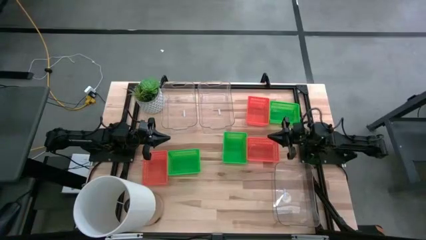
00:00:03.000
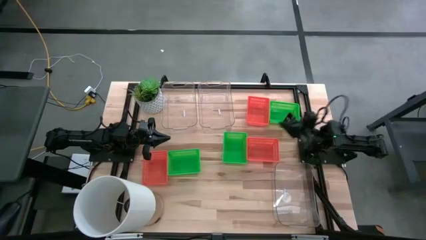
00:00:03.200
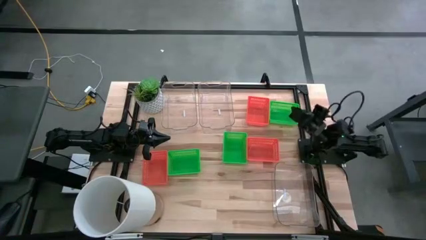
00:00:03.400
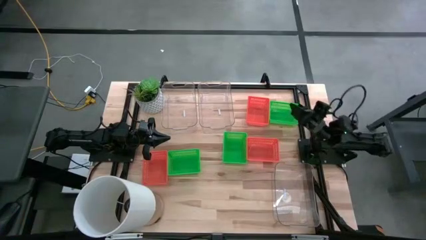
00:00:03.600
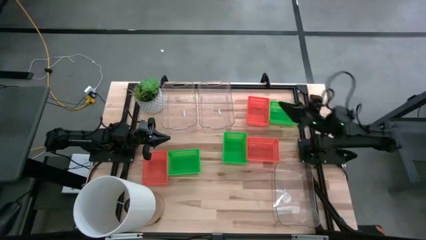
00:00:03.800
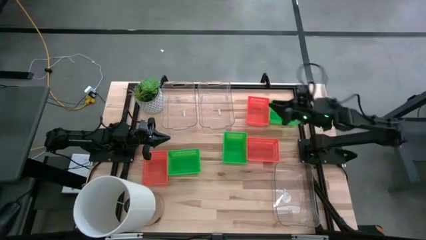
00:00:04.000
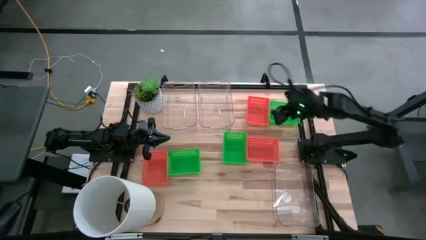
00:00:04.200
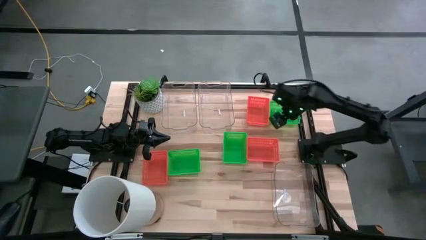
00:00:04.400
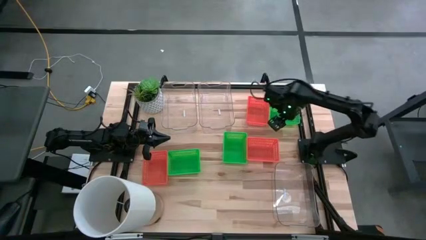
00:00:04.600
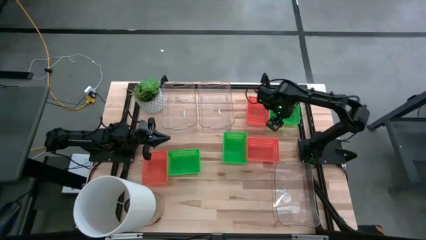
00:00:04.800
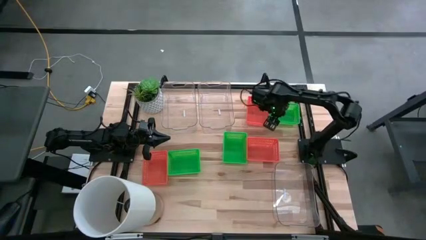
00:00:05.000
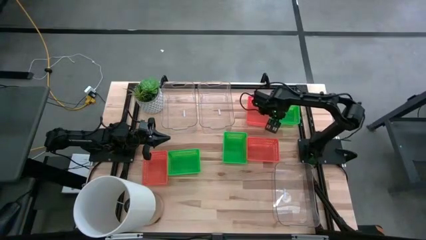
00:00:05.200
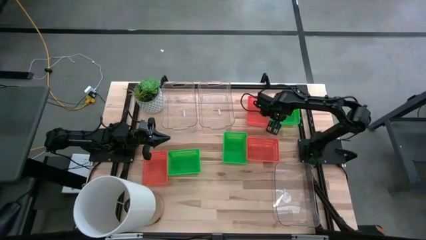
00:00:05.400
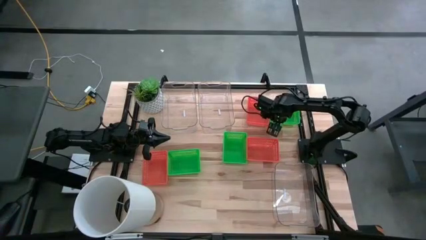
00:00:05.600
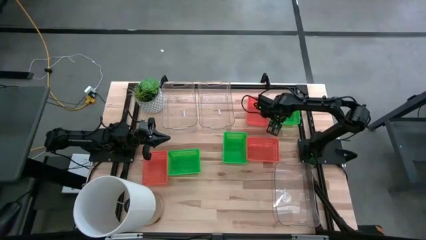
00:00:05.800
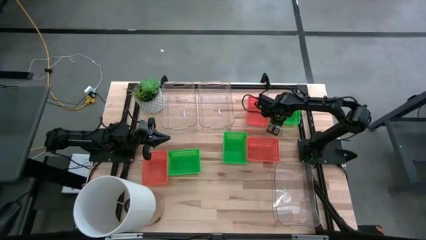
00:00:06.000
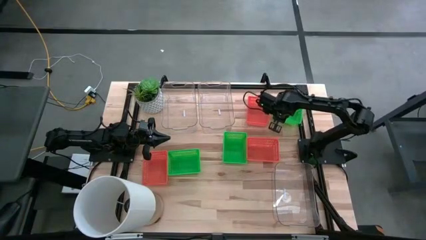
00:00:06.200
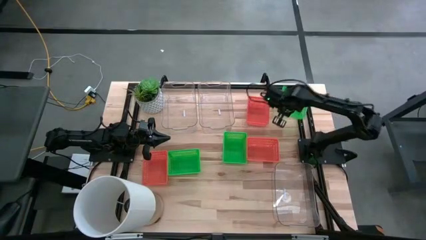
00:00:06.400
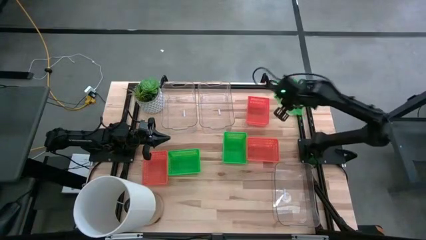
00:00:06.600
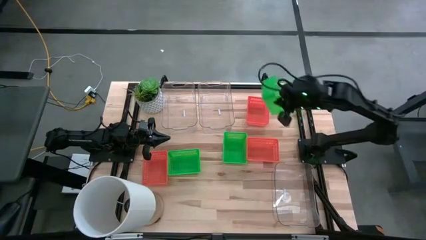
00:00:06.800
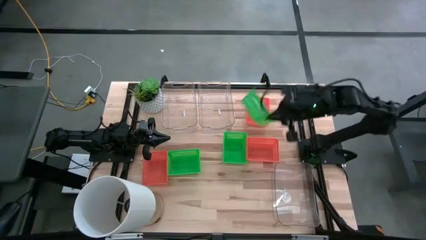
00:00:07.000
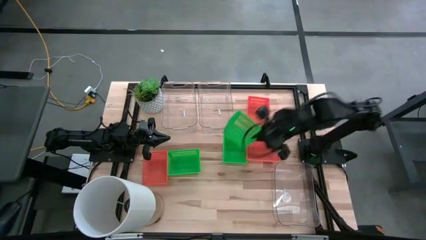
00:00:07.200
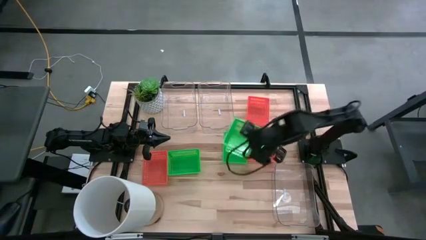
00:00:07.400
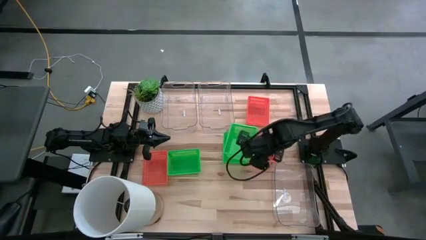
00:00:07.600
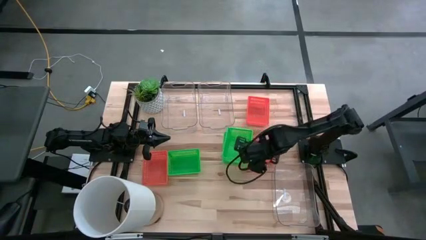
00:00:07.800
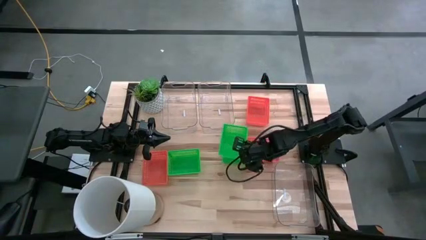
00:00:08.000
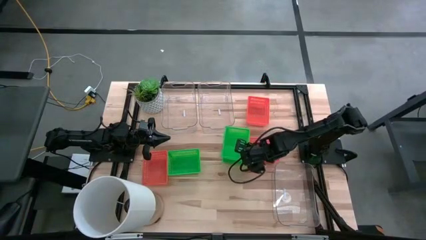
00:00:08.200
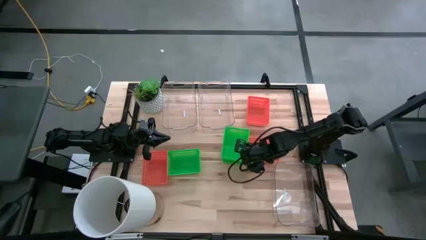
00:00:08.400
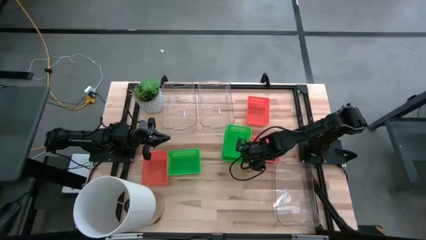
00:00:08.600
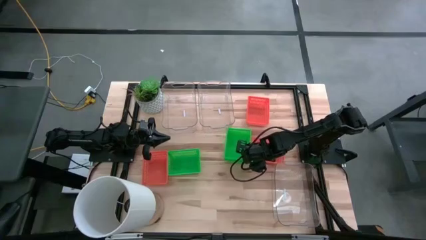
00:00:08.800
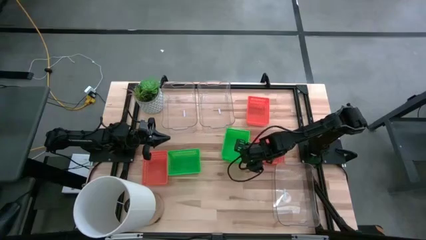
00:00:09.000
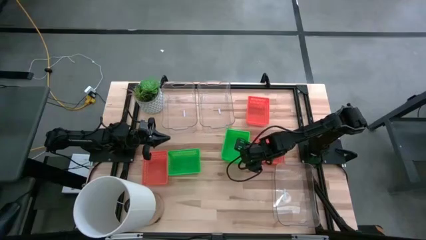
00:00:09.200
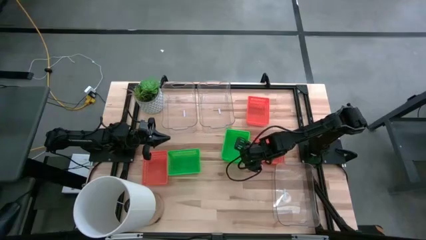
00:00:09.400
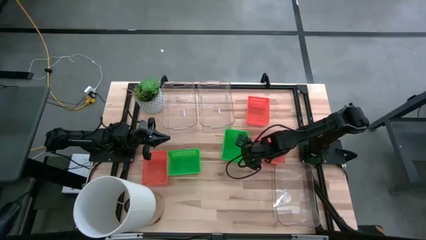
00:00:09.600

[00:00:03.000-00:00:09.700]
Stack the top right green bin on the bottom right green bin

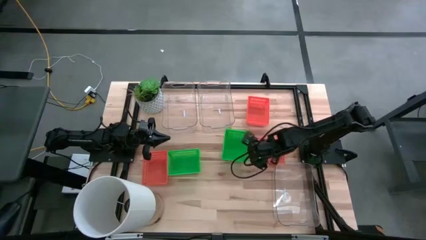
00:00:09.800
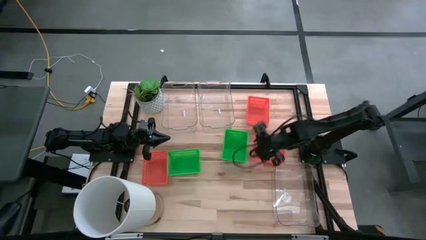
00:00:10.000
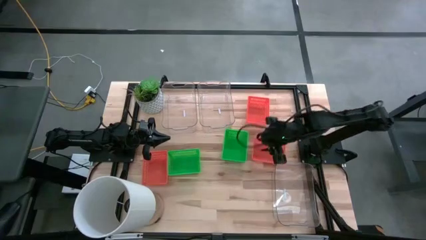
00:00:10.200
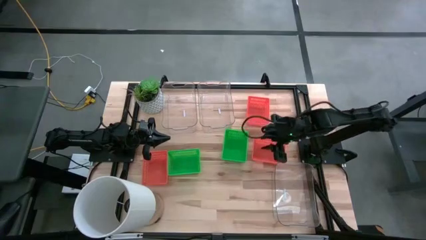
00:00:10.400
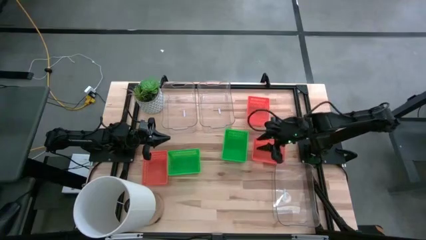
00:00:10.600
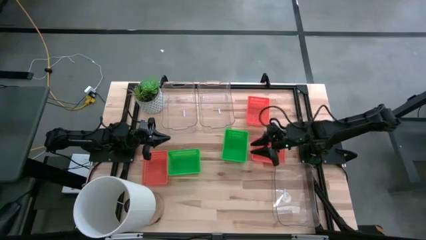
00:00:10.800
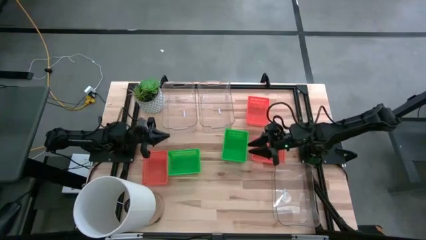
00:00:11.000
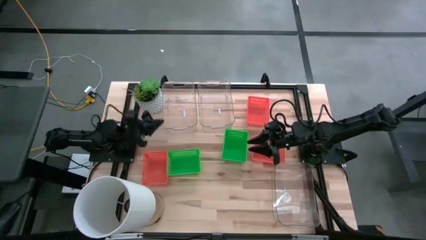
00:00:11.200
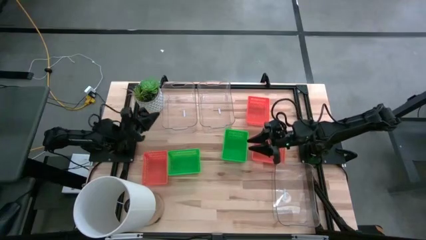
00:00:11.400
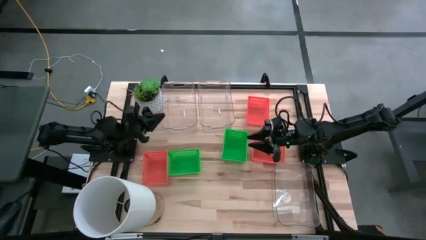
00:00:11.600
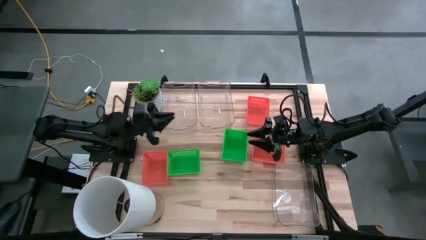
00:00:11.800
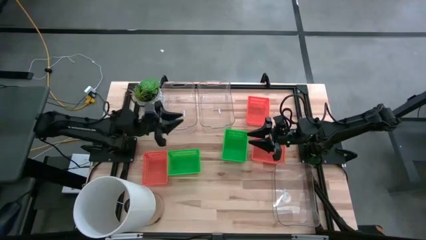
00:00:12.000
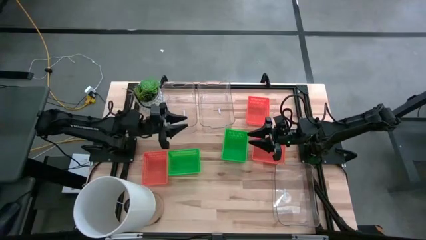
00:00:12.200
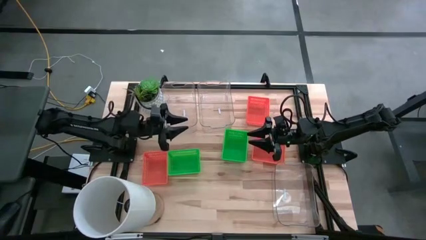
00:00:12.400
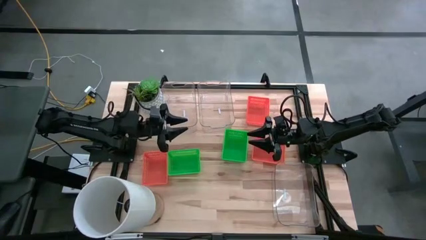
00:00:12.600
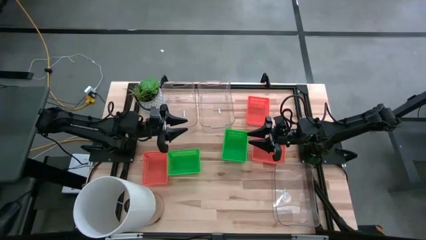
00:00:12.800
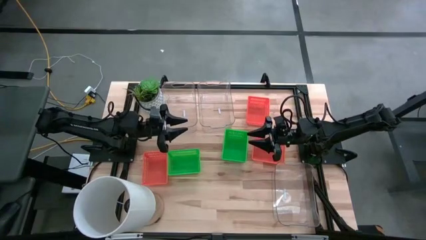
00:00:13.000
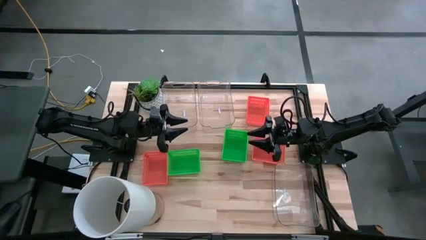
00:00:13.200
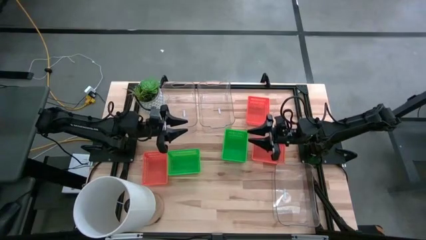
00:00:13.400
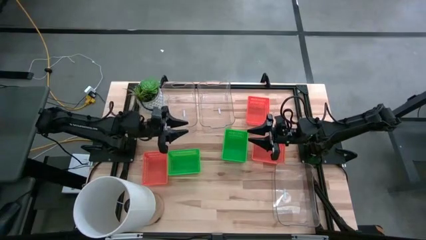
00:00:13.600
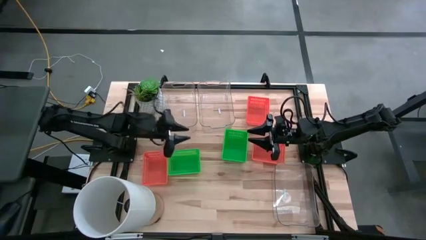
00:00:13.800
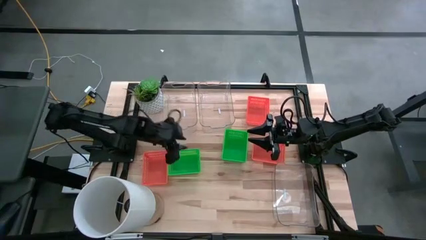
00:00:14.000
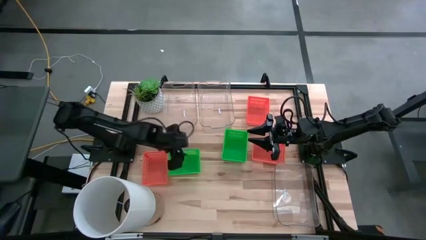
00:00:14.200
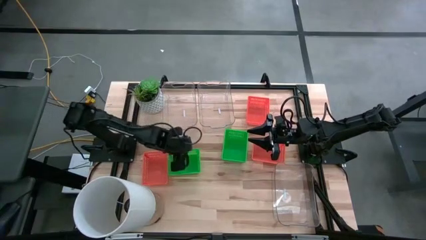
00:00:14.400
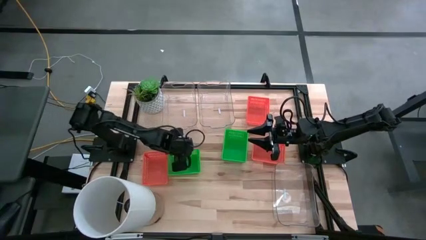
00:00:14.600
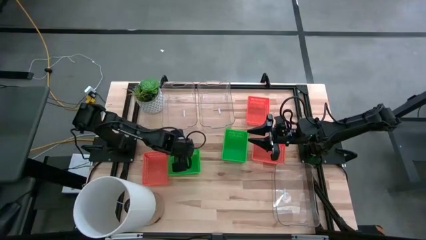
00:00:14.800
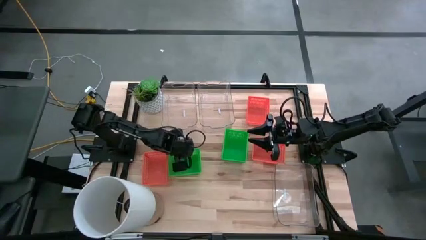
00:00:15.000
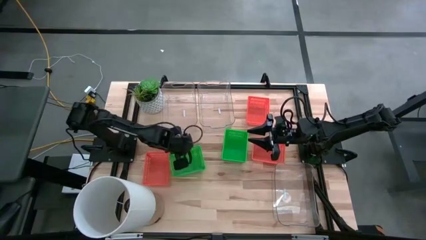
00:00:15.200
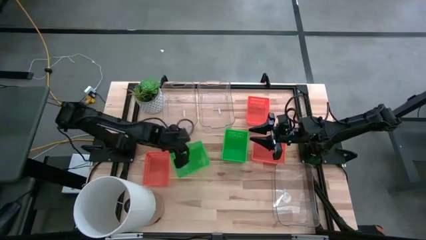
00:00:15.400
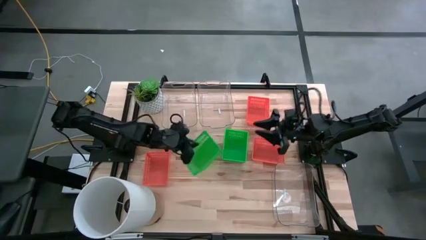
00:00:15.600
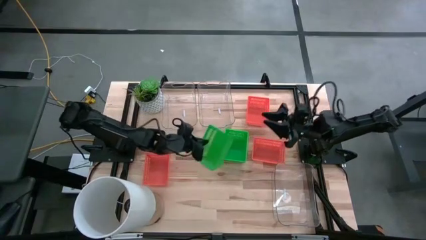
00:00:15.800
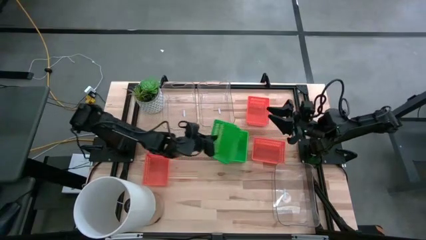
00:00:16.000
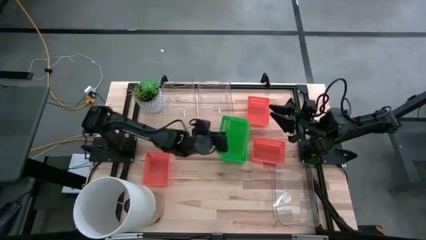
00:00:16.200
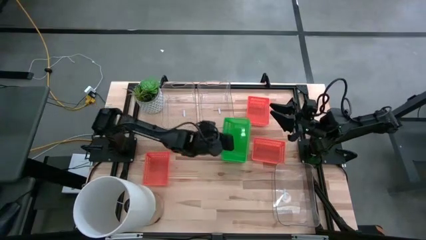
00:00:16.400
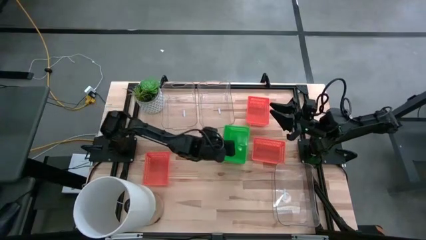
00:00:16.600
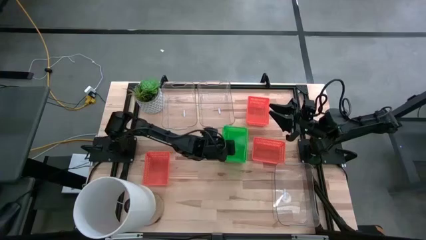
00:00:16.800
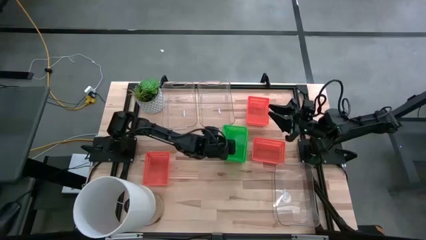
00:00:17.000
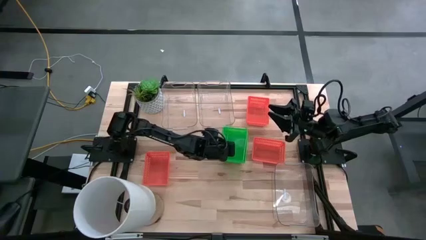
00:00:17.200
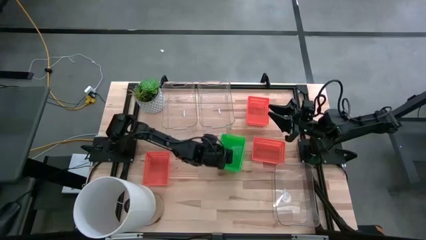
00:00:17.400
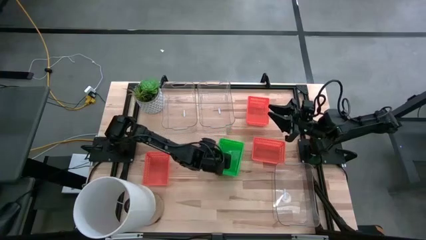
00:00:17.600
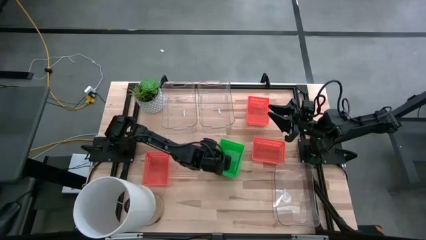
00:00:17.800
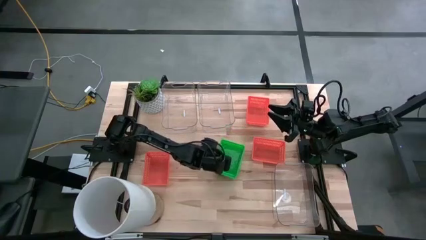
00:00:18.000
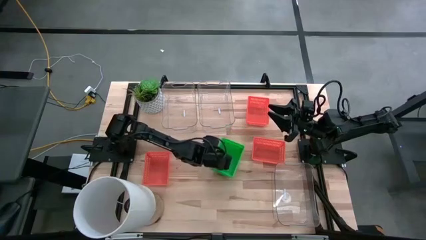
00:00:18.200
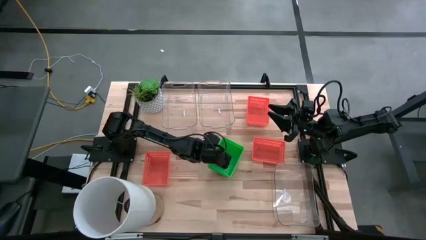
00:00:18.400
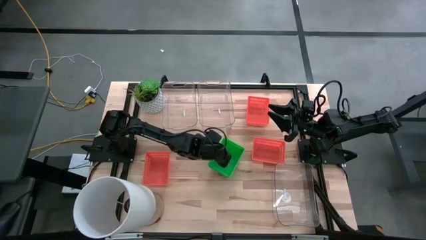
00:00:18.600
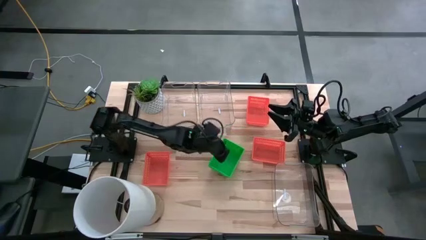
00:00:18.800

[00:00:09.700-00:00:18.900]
Stack the left green bin on the right green bin
